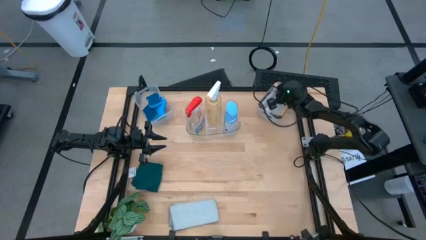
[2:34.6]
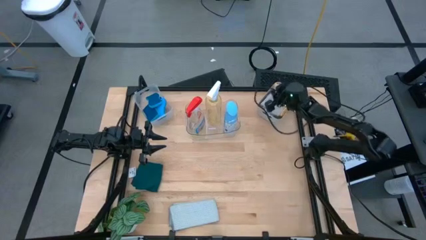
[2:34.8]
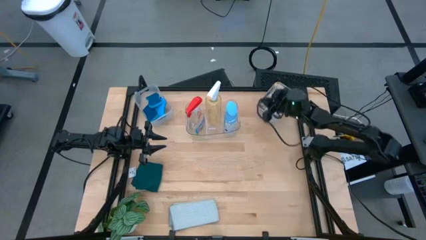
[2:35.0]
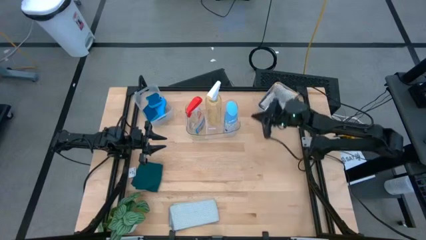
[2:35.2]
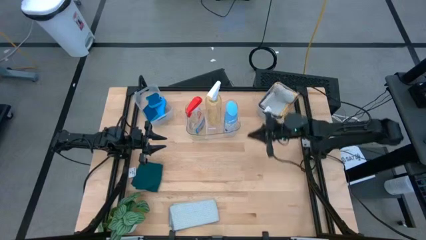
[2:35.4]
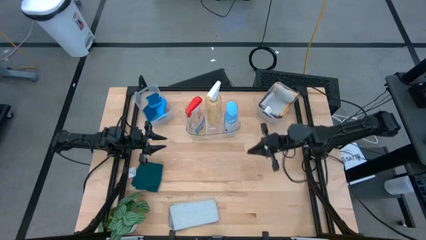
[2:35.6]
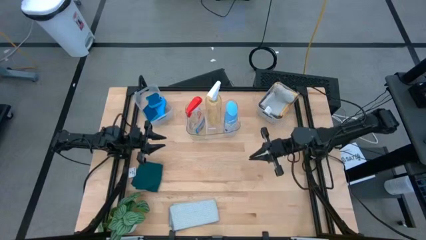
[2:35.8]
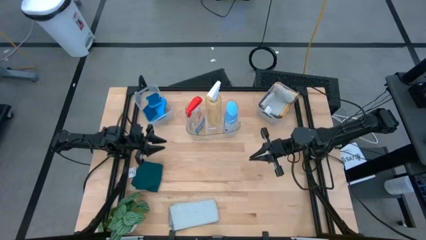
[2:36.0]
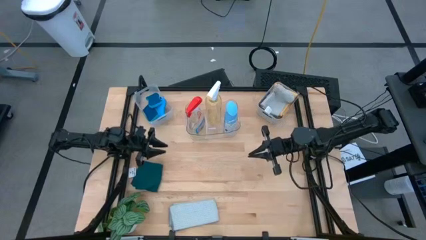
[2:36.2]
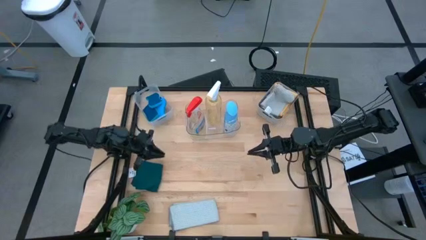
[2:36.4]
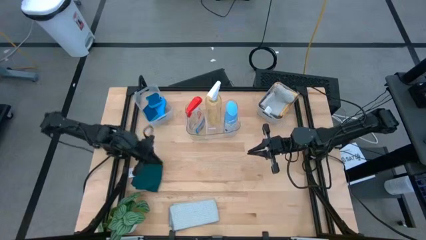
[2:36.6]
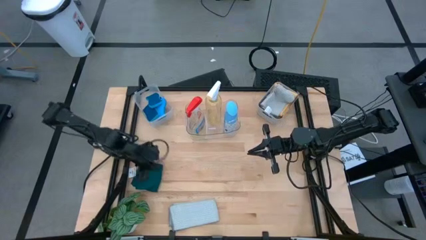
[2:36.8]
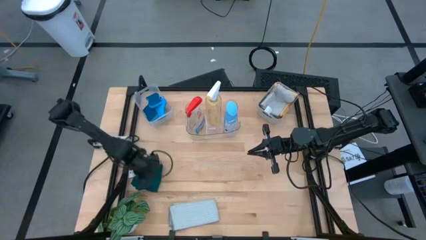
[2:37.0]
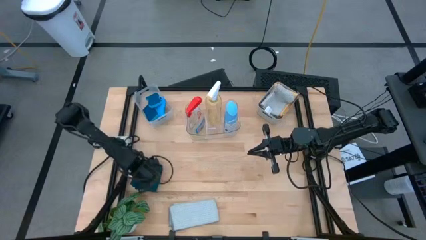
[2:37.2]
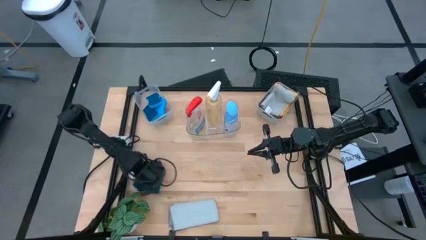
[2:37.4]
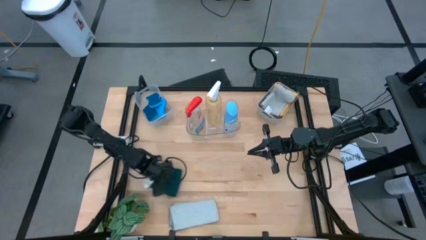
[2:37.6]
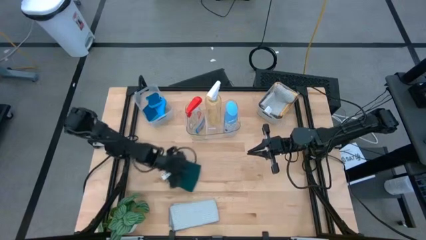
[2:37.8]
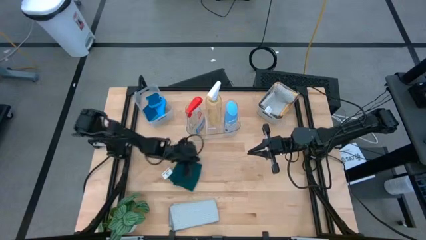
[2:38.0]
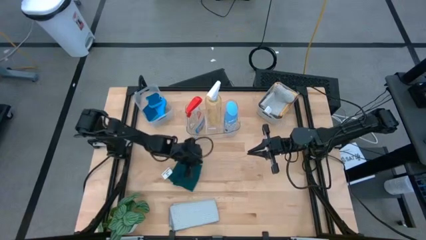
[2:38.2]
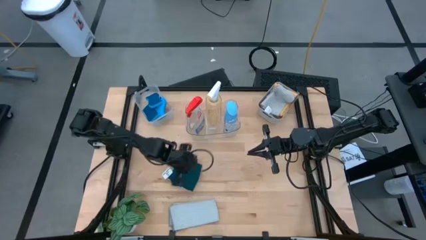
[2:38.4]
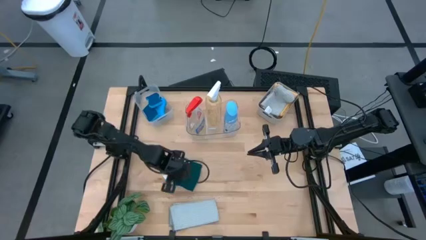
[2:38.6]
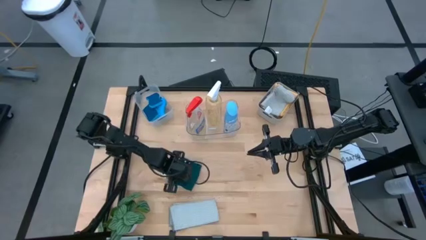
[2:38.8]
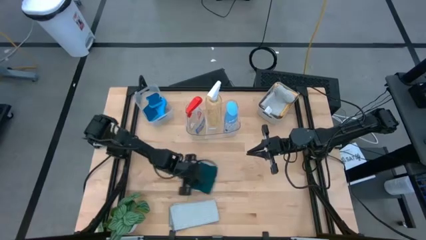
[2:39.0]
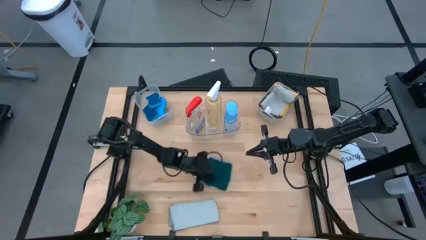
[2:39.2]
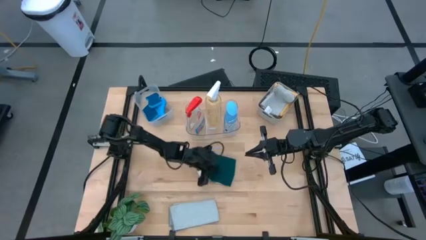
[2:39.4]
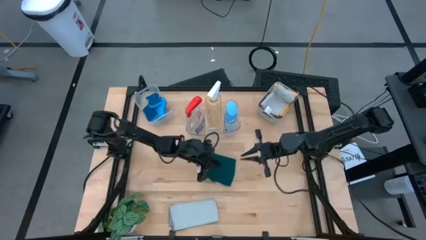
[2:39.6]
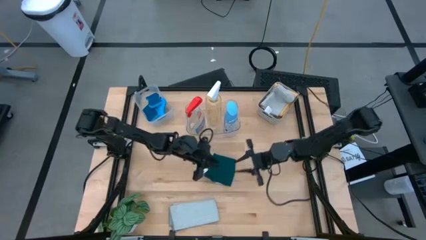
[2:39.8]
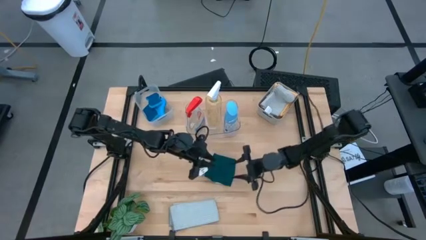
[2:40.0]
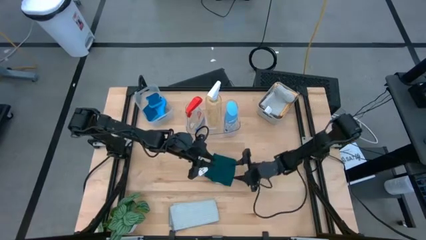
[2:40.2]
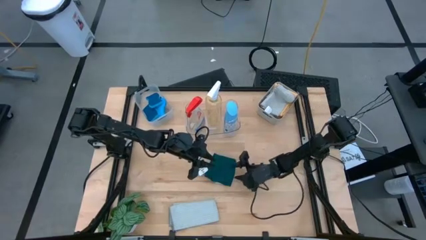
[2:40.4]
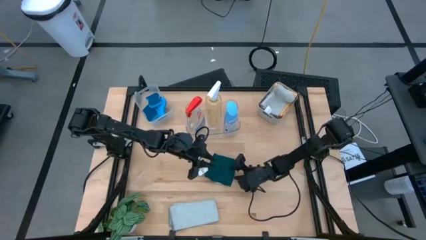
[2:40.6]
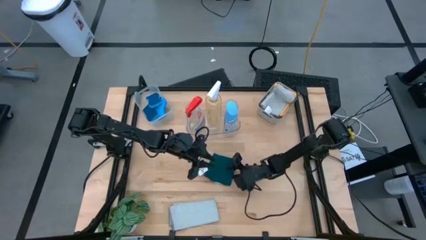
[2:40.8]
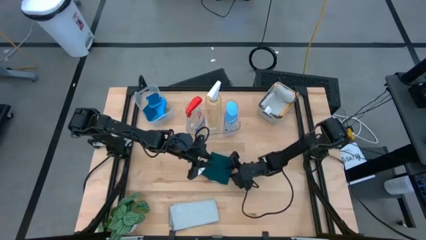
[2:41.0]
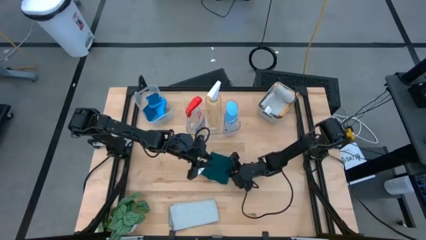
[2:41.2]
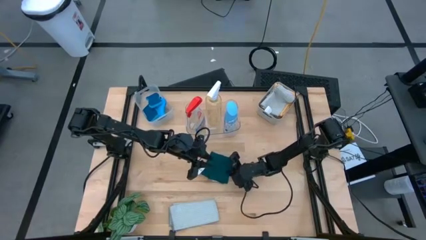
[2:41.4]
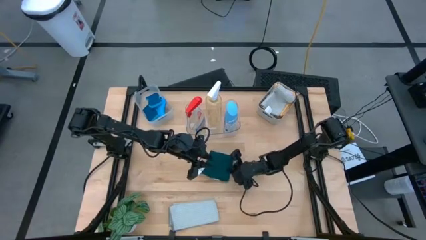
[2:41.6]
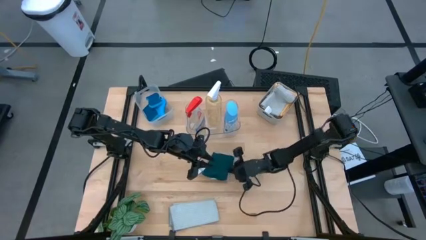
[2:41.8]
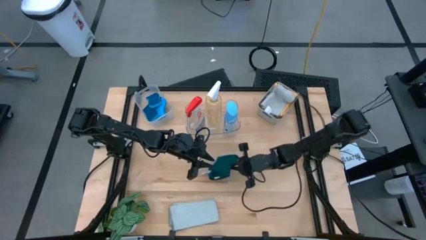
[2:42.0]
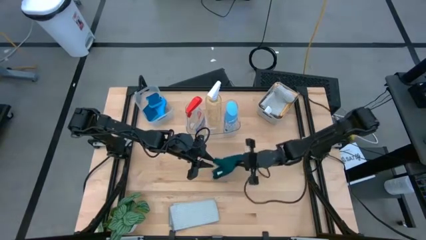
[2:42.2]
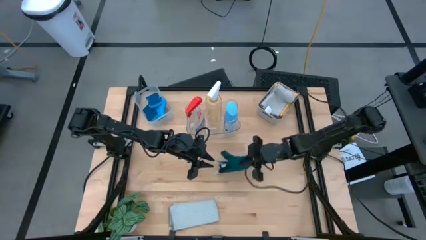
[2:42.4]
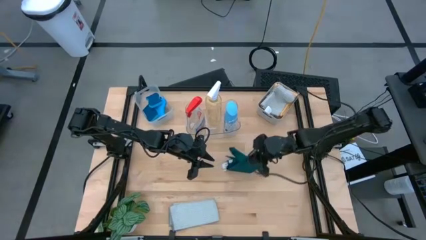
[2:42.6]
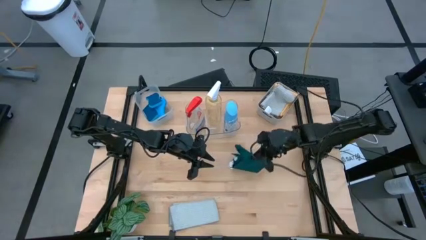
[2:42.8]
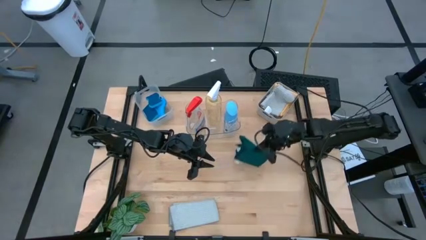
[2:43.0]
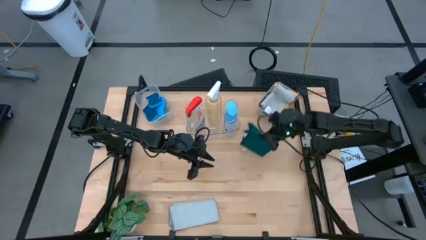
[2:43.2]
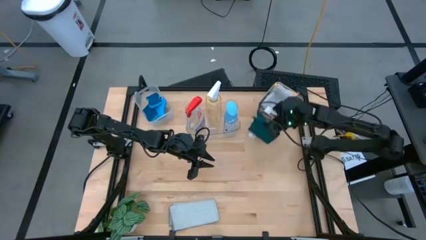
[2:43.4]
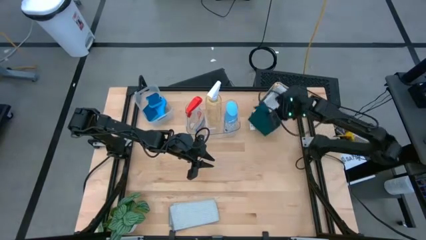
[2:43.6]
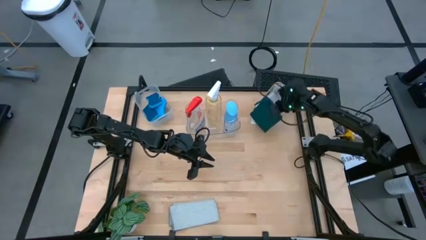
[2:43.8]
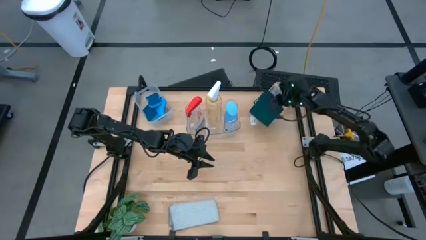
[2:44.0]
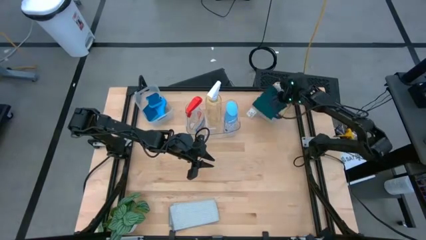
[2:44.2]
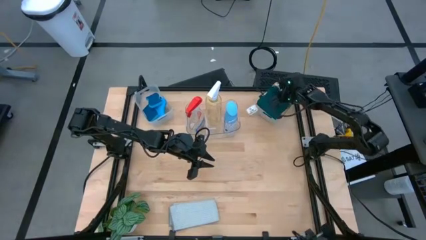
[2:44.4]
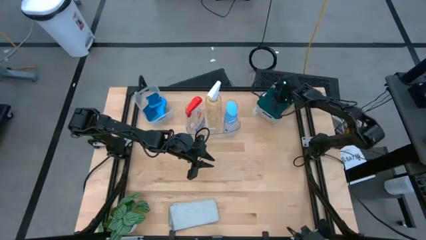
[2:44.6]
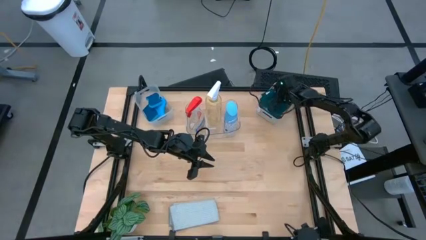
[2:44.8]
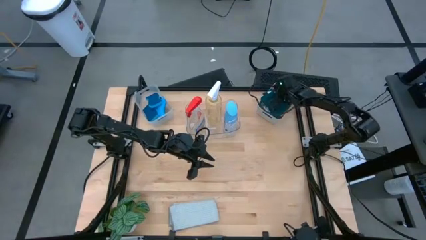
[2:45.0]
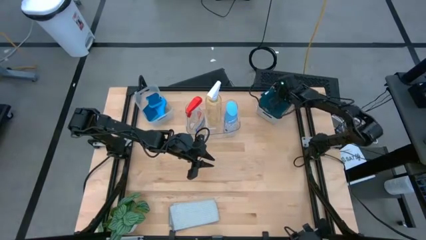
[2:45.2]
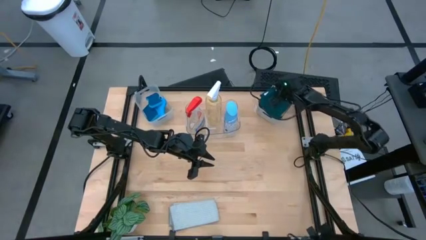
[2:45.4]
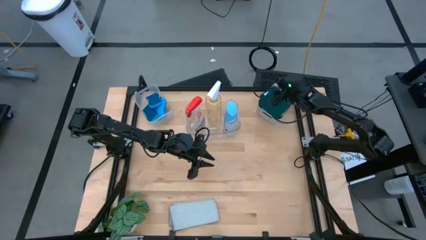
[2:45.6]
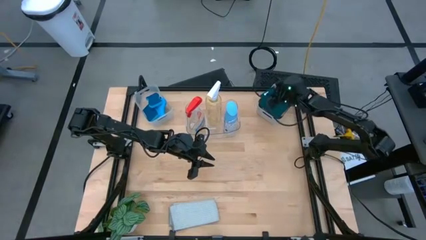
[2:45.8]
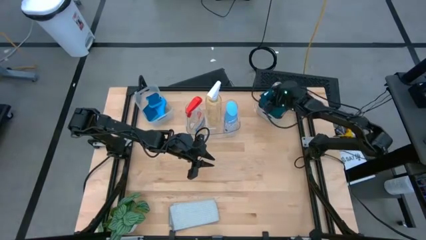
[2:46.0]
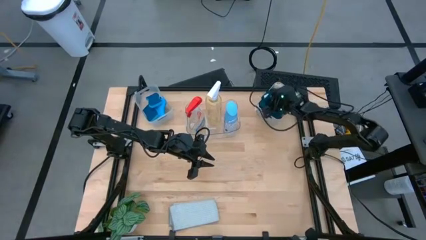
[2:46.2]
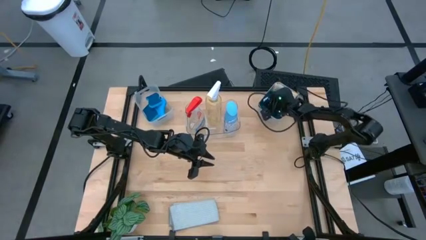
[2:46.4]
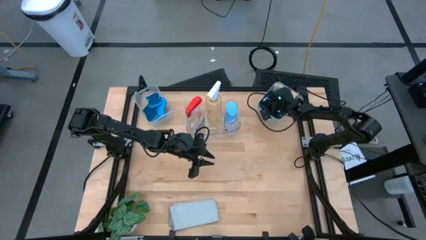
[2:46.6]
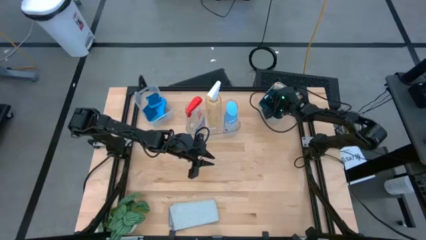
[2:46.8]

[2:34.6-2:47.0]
Task: Pick & Place Kitchen Items
Put the green microfiber towel into the gray bin
